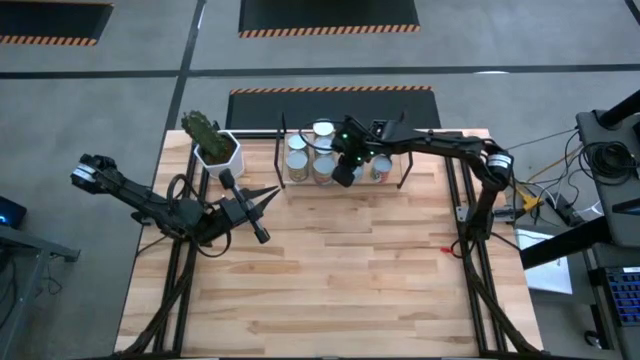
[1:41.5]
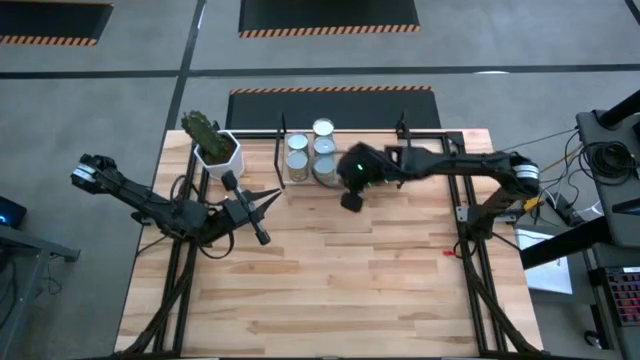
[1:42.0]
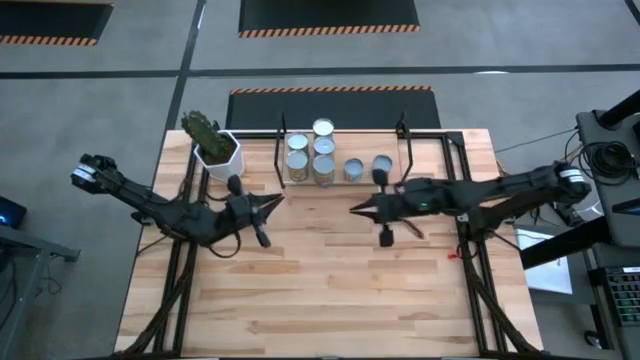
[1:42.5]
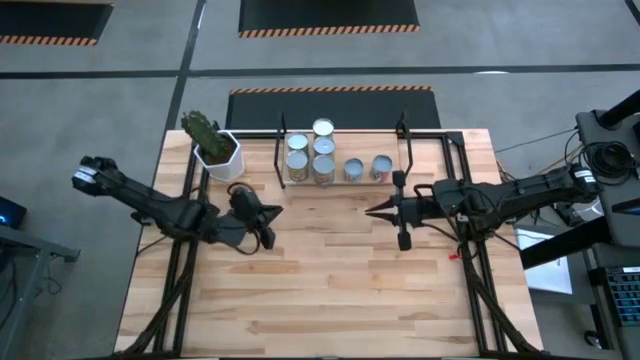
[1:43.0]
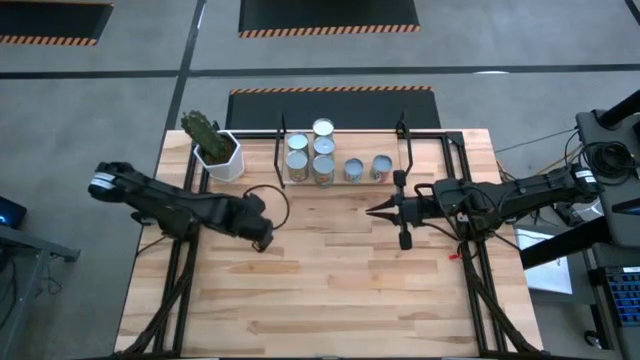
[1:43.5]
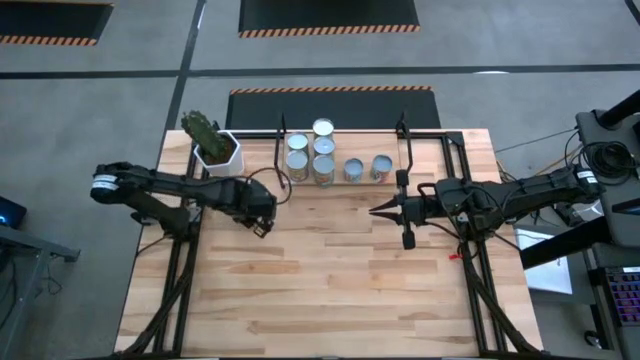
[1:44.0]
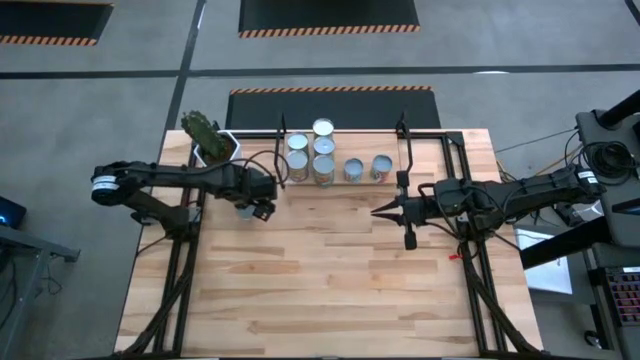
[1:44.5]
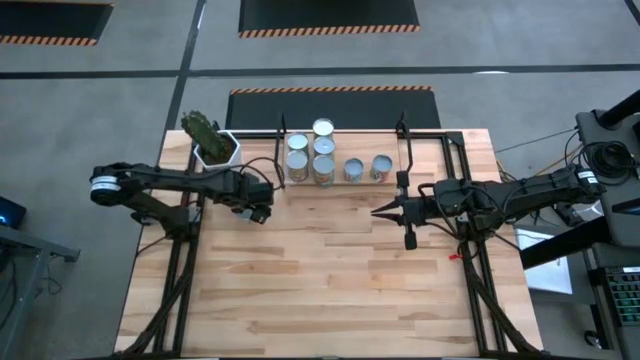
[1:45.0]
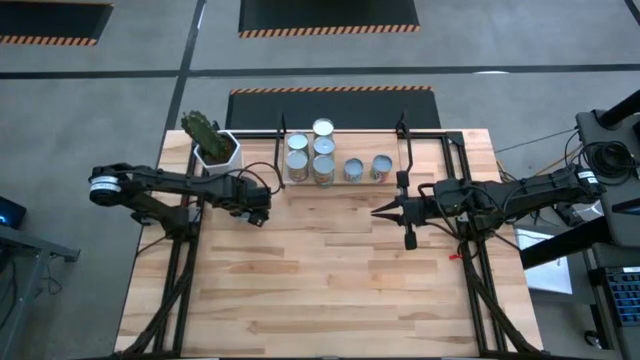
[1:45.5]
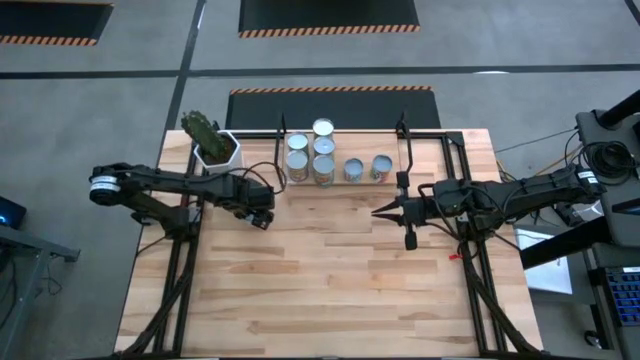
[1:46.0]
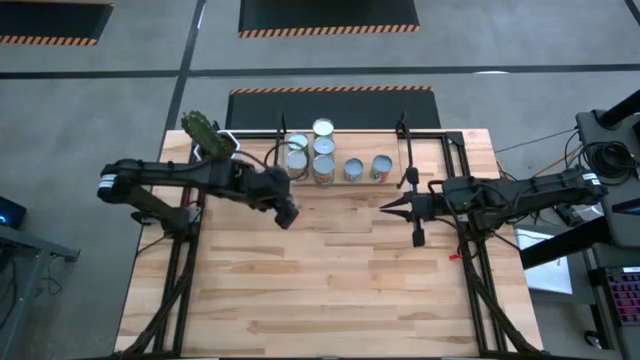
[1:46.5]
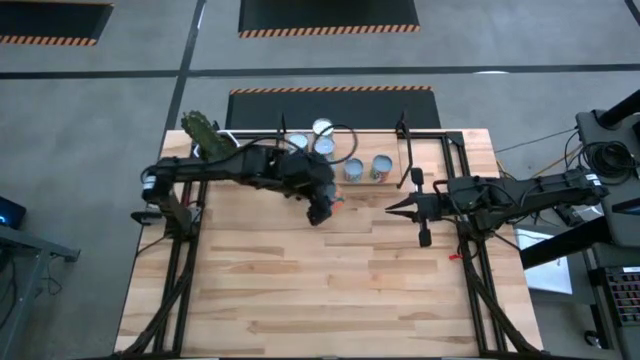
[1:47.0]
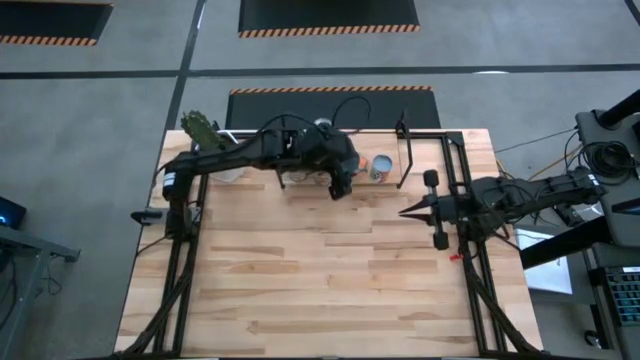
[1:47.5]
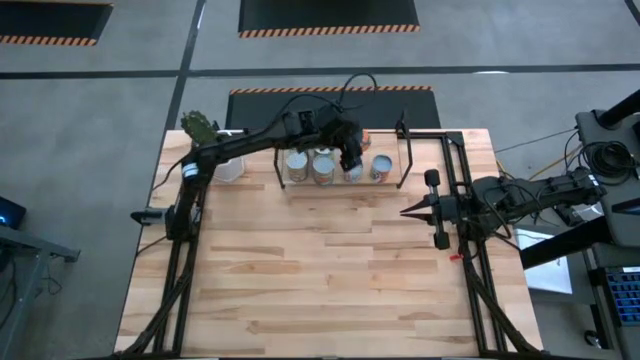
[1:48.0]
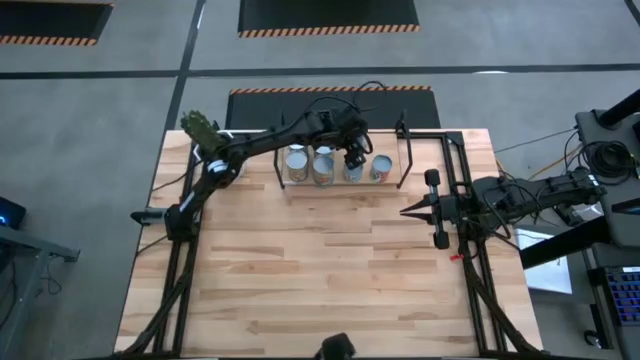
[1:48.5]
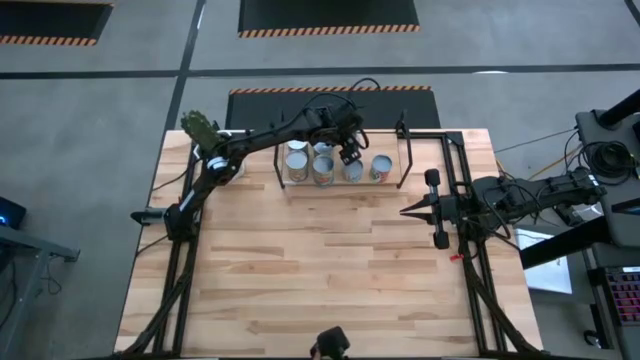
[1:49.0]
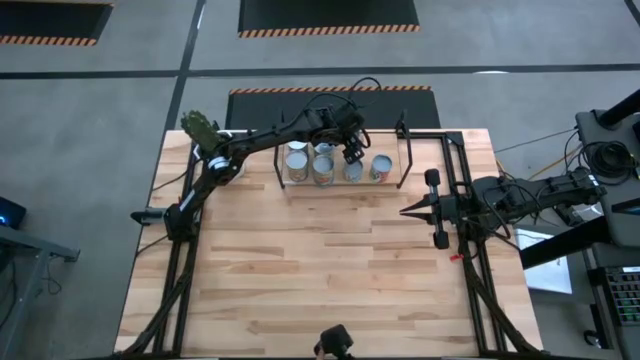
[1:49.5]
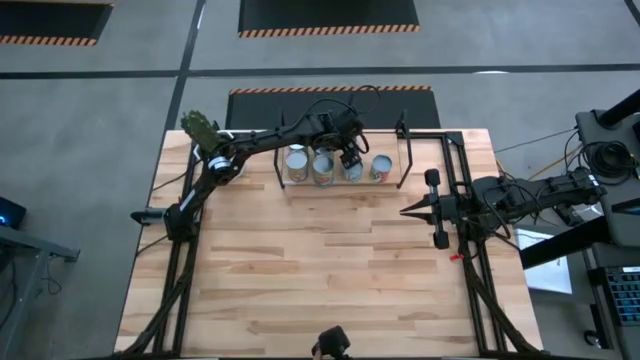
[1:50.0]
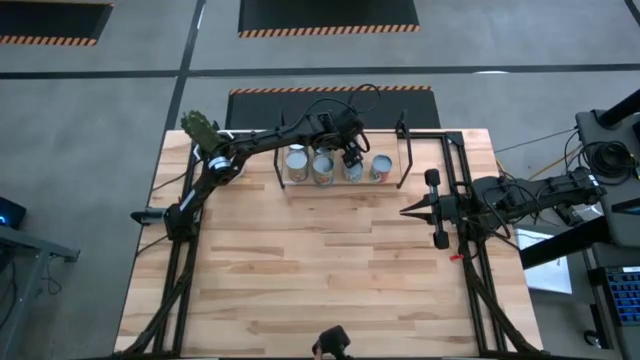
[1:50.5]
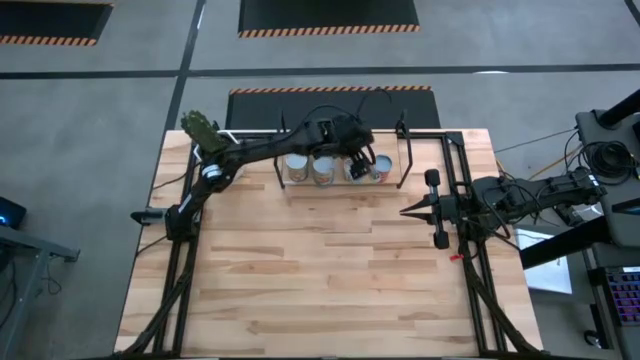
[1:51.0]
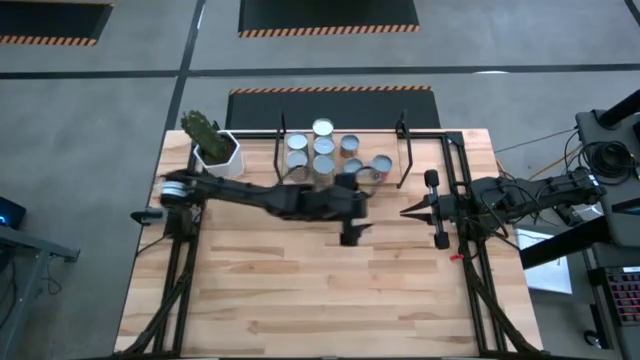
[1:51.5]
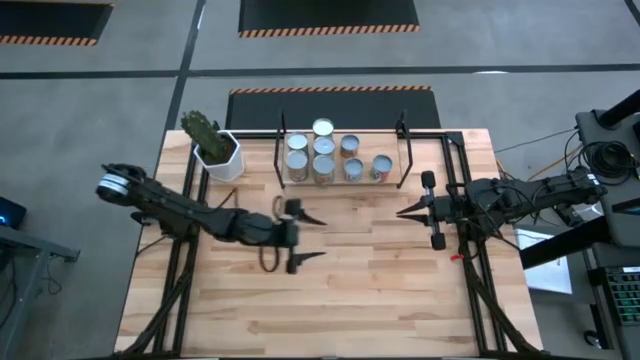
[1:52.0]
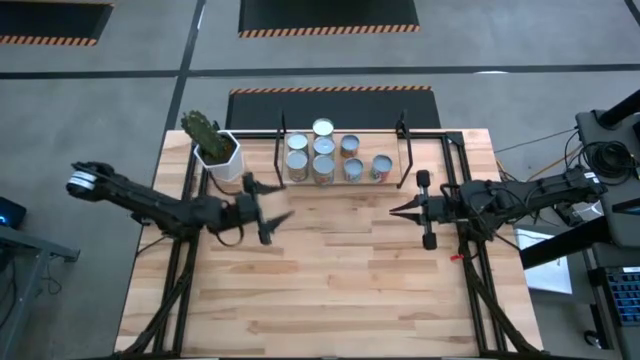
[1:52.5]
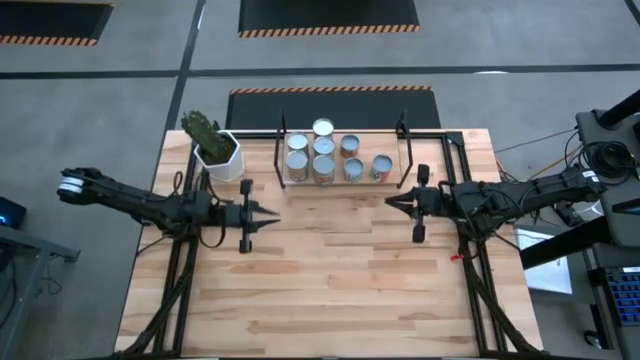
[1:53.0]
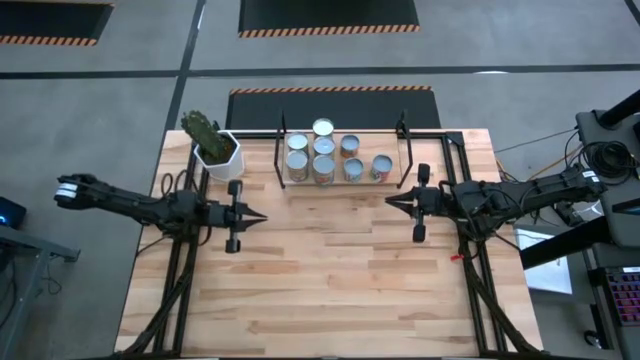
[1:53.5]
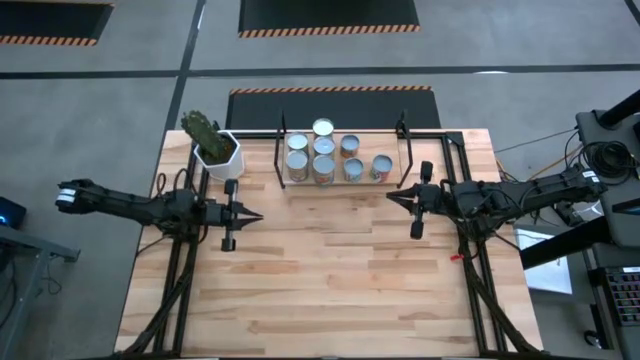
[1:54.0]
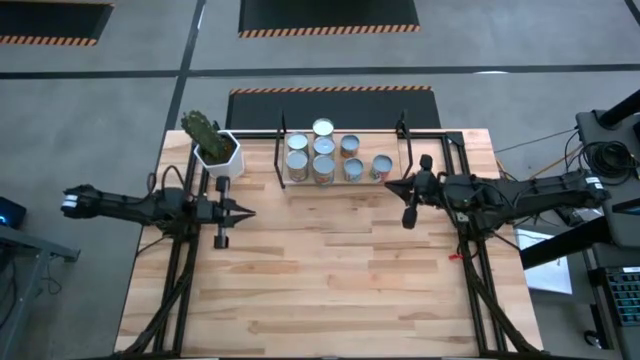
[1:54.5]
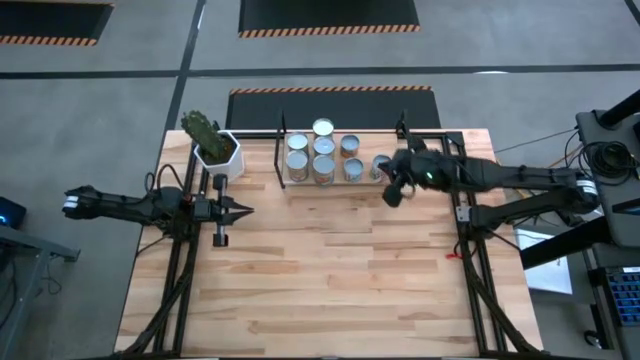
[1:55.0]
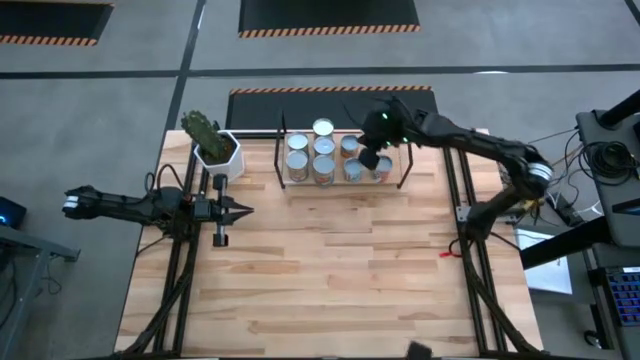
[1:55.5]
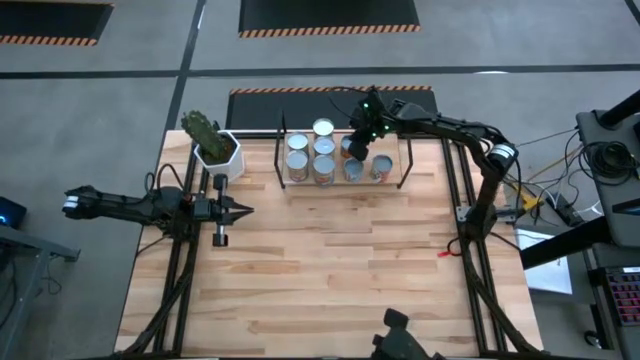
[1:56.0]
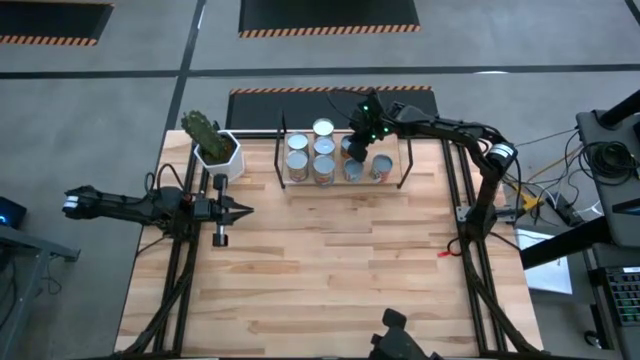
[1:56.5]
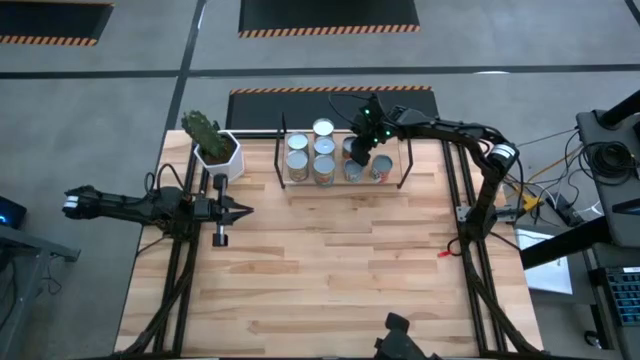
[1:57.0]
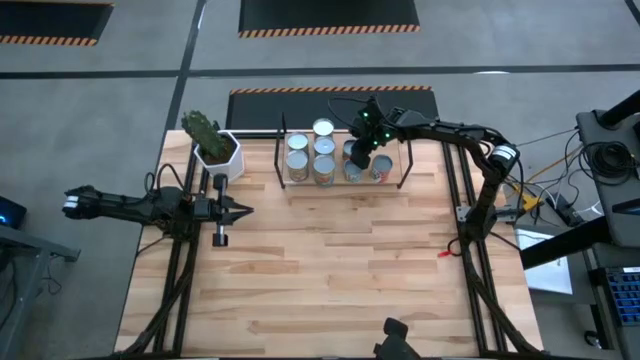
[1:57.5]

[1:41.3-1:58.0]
Task: Pick and place cans onto a shelf
Put the small canned oranges on the shelf

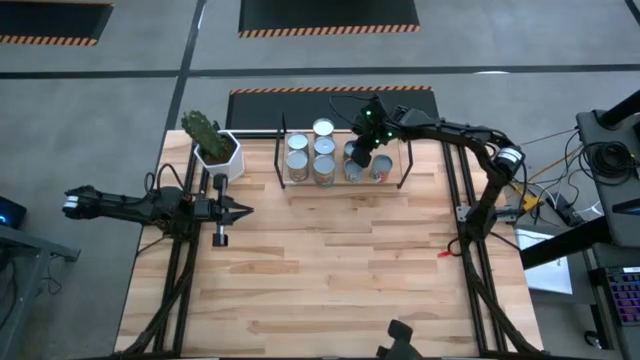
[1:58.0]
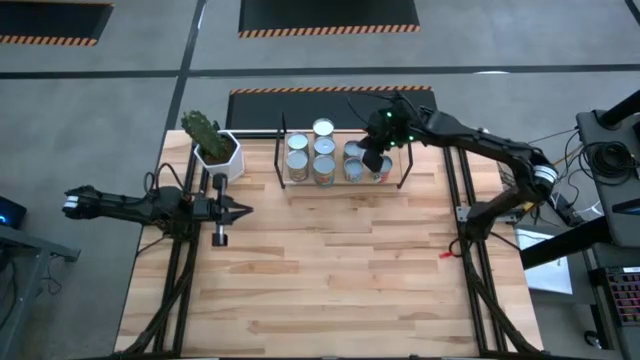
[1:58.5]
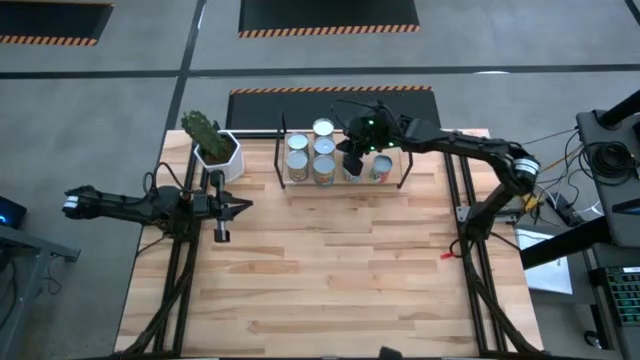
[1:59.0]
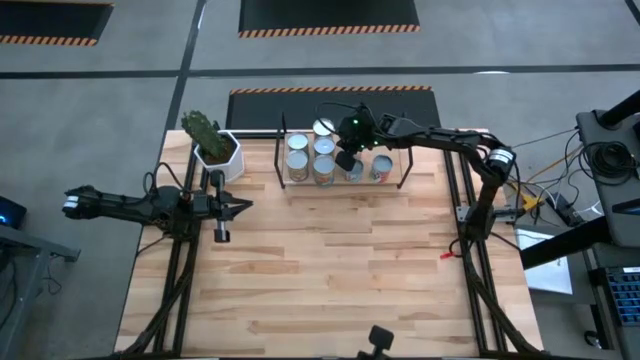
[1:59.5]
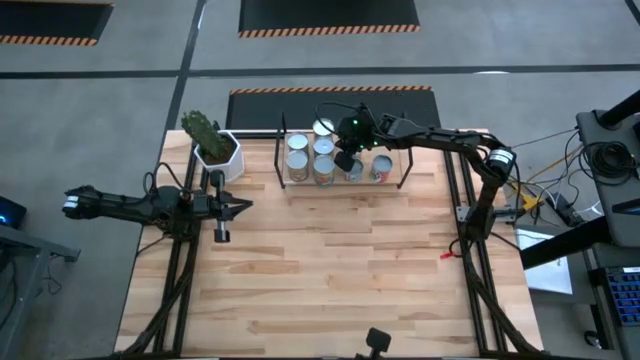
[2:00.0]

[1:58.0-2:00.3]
Adjust the large canned oranges on the shelf

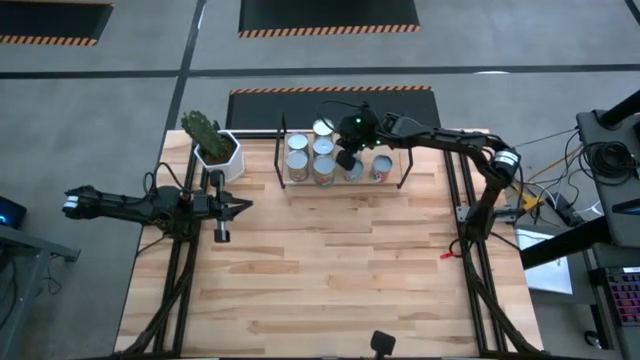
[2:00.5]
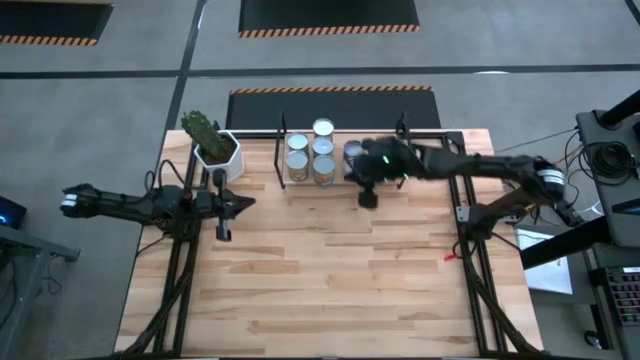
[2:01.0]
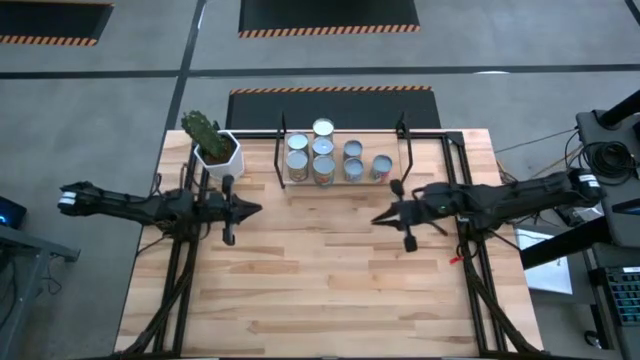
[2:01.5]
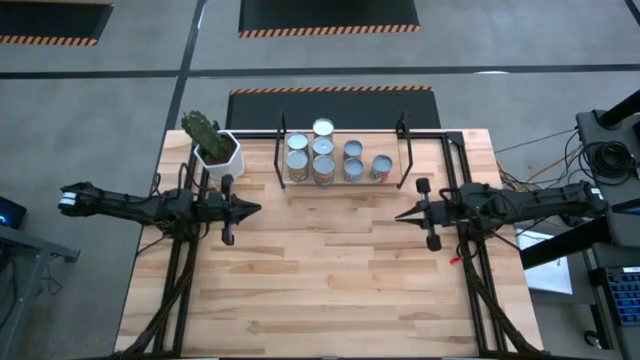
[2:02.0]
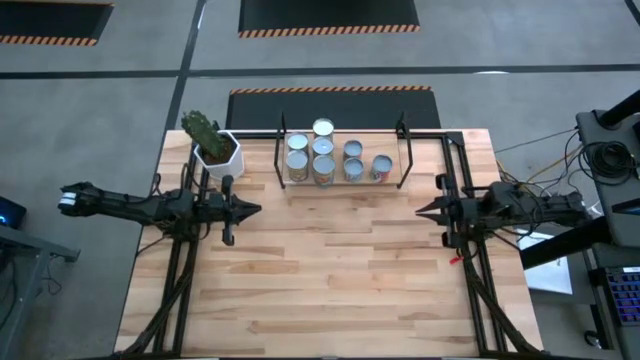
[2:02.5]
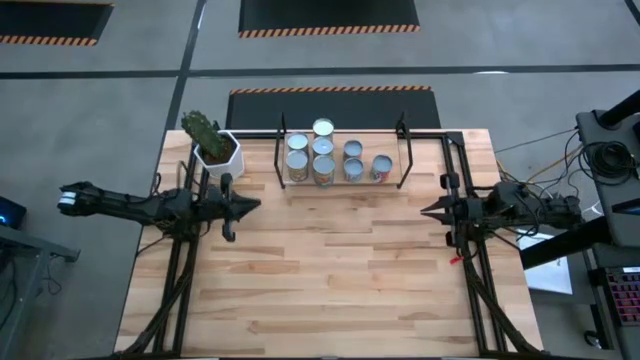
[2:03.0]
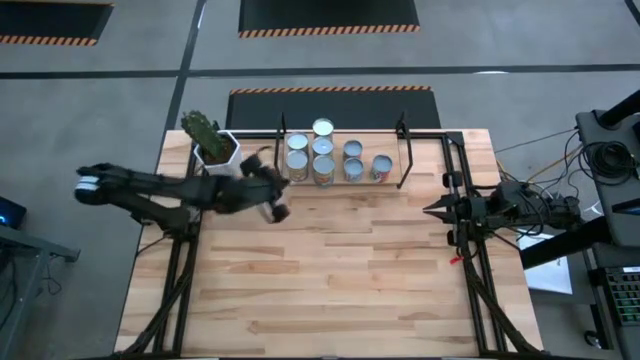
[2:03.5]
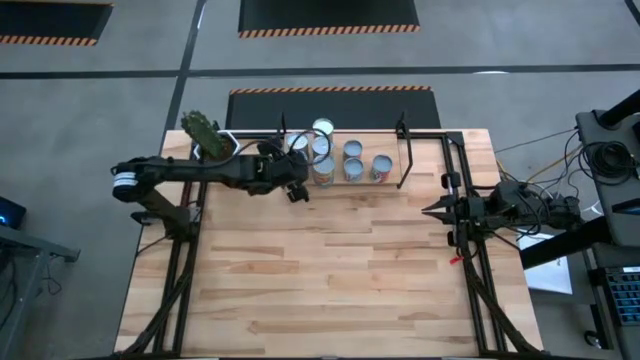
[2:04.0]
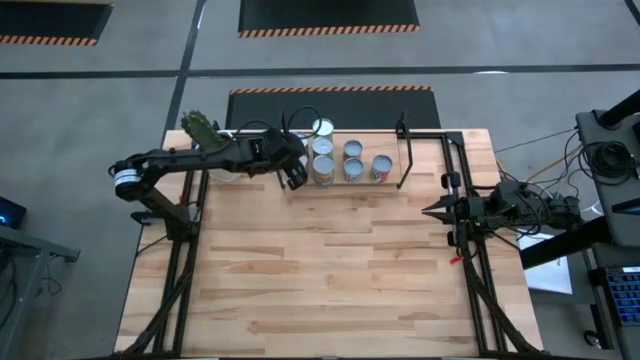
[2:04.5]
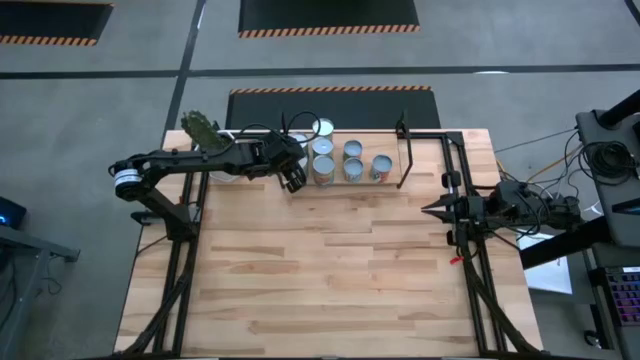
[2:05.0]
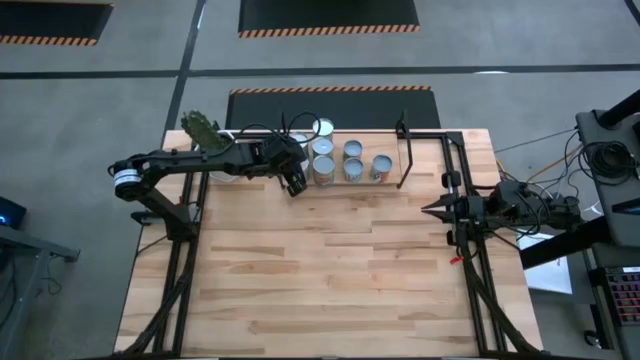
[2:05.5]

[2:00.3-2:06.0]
Adjust the canned peaches on the shelf
